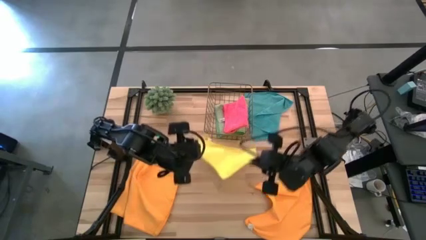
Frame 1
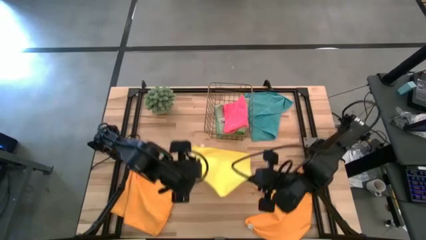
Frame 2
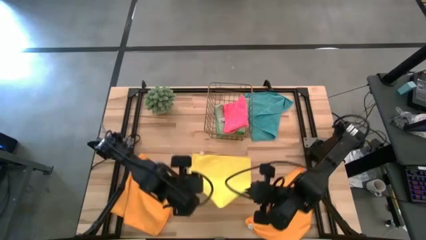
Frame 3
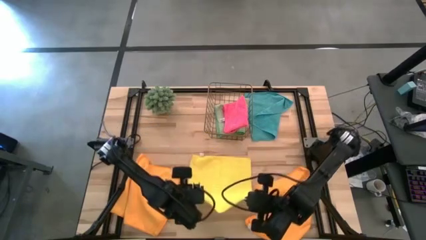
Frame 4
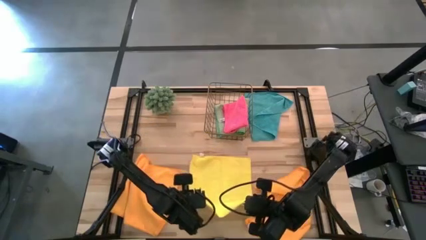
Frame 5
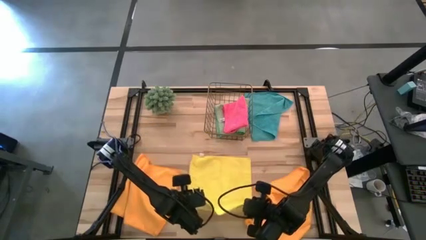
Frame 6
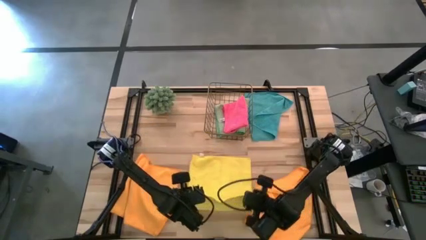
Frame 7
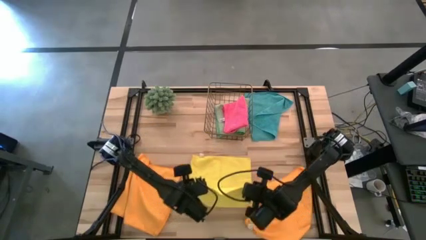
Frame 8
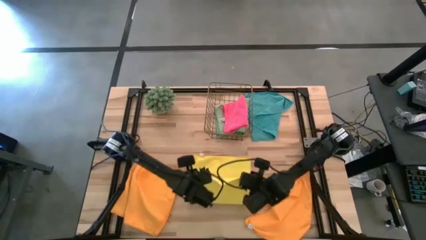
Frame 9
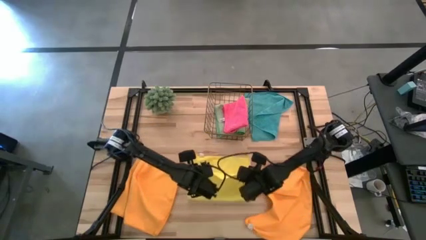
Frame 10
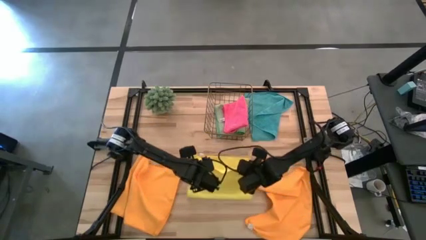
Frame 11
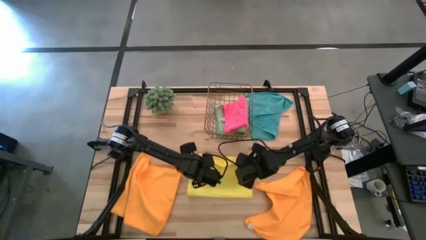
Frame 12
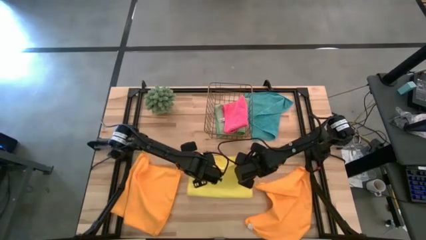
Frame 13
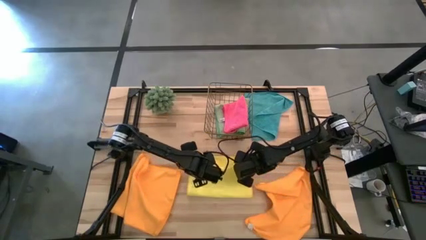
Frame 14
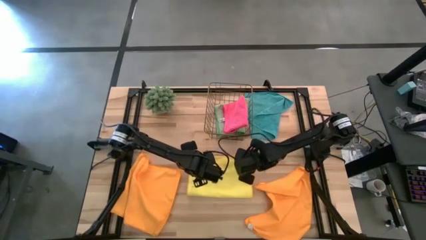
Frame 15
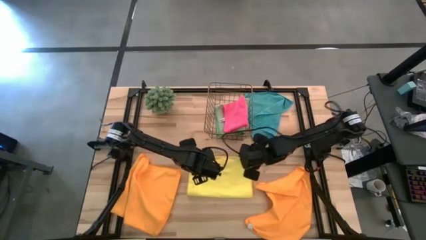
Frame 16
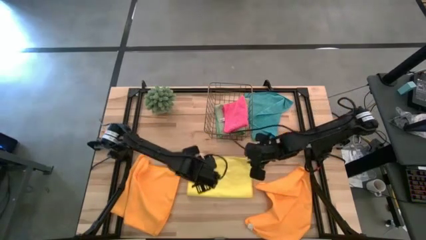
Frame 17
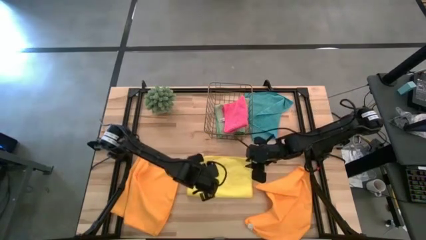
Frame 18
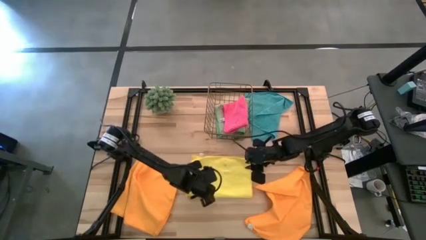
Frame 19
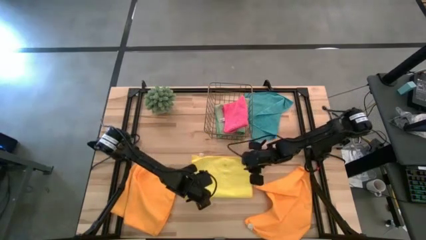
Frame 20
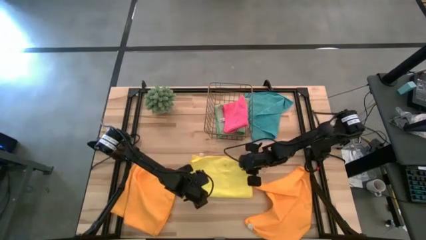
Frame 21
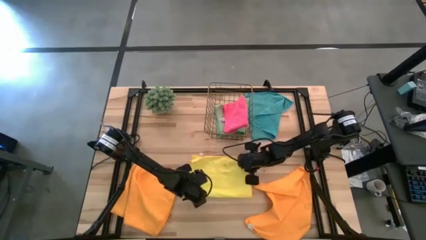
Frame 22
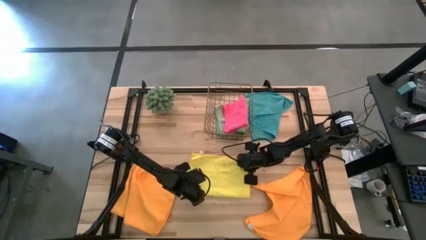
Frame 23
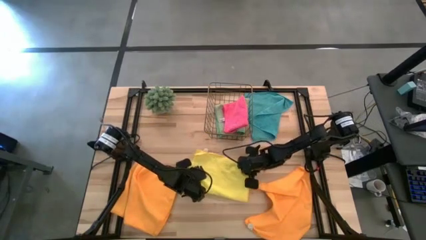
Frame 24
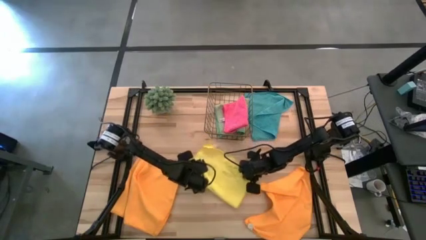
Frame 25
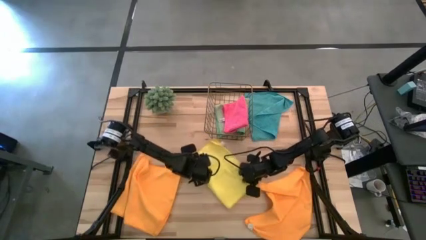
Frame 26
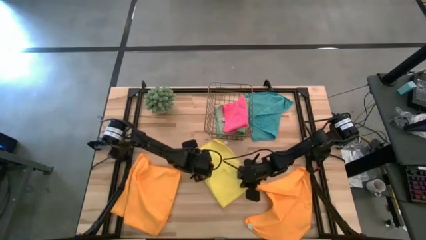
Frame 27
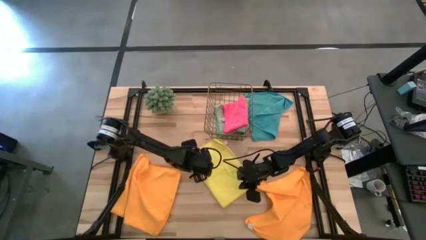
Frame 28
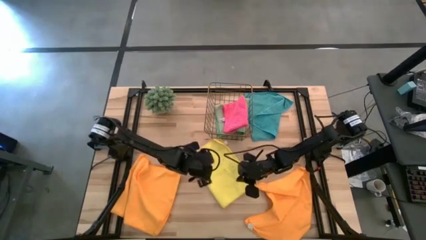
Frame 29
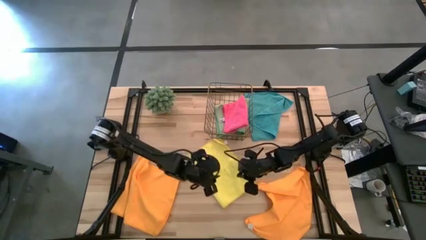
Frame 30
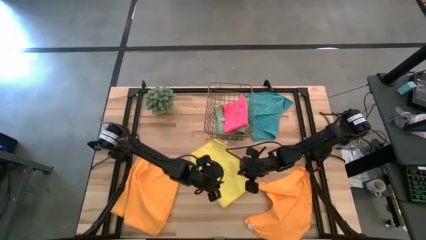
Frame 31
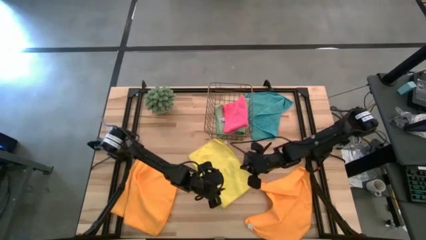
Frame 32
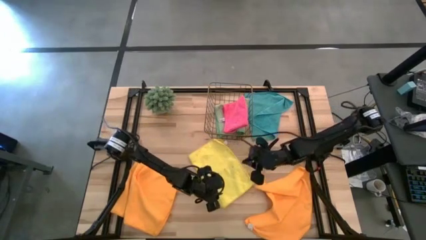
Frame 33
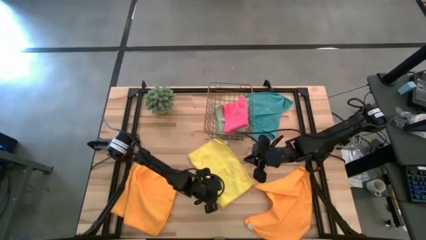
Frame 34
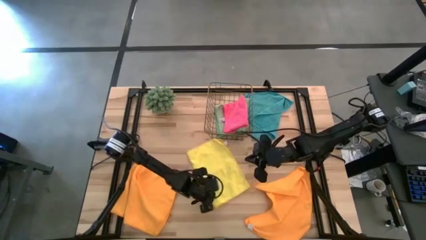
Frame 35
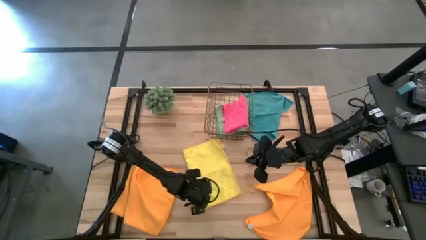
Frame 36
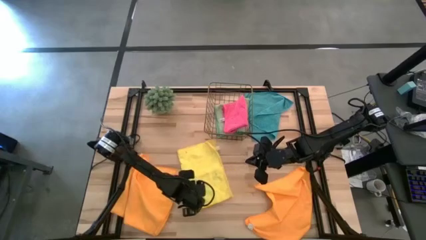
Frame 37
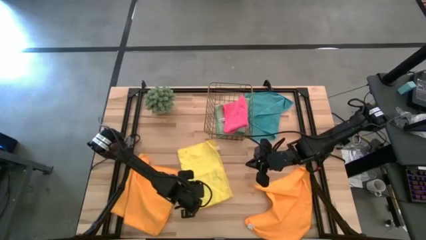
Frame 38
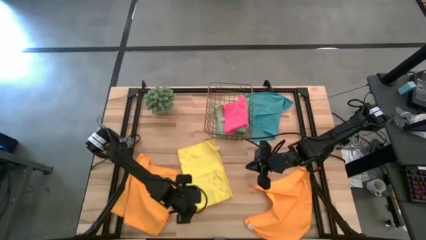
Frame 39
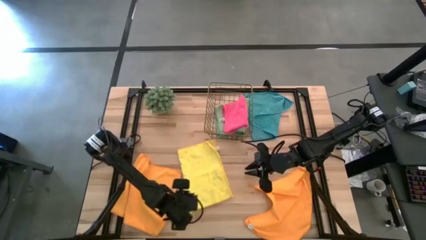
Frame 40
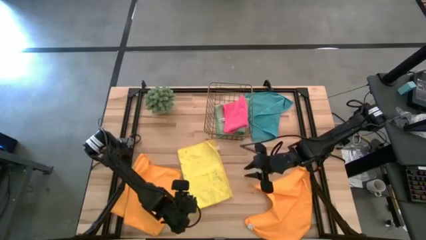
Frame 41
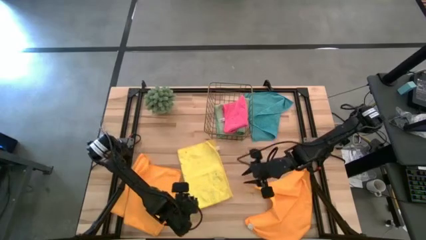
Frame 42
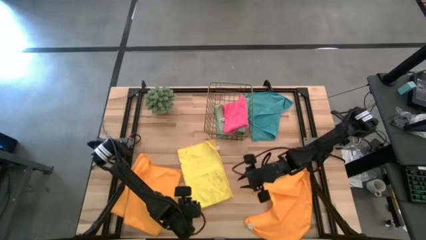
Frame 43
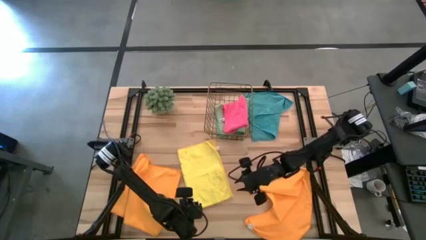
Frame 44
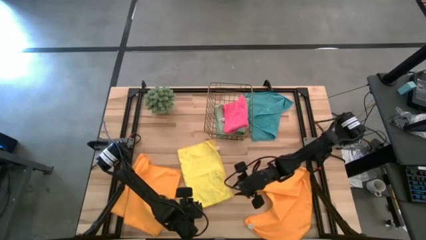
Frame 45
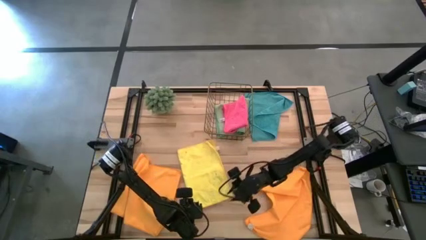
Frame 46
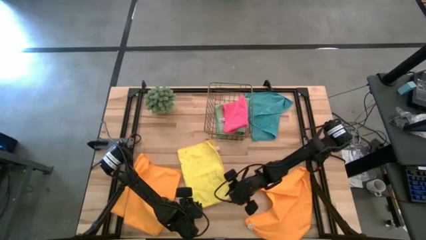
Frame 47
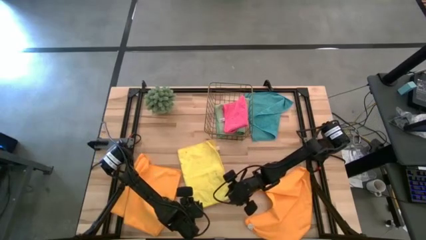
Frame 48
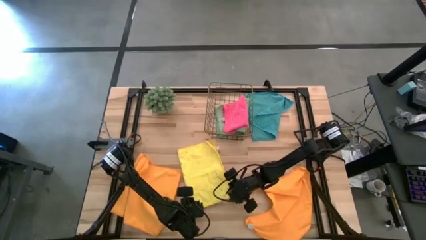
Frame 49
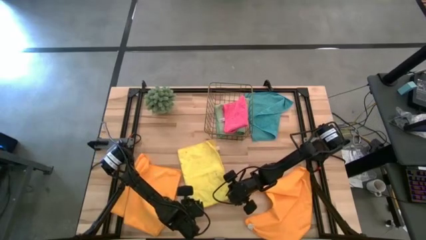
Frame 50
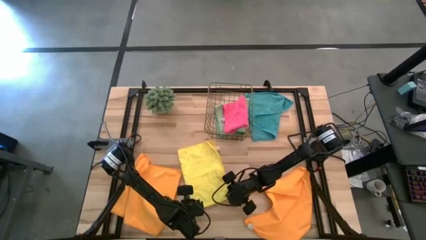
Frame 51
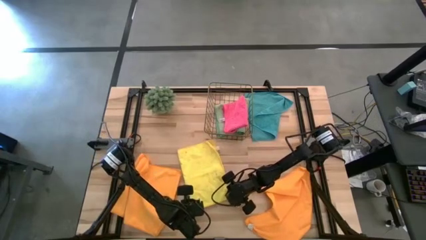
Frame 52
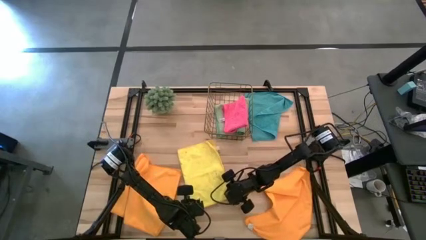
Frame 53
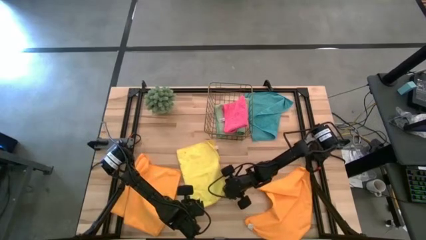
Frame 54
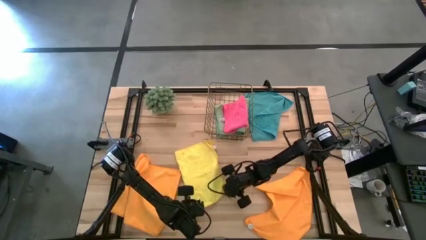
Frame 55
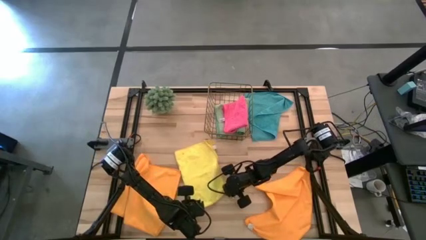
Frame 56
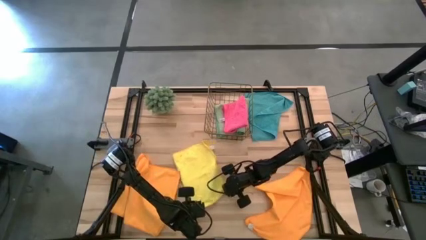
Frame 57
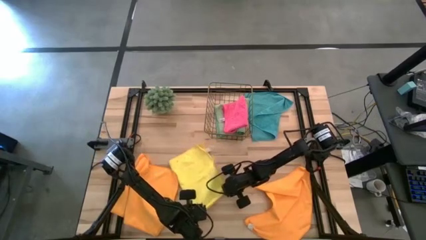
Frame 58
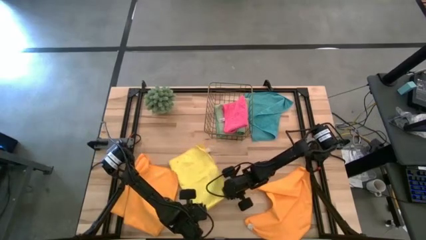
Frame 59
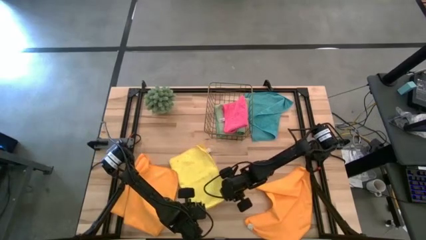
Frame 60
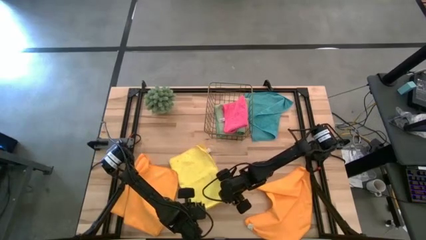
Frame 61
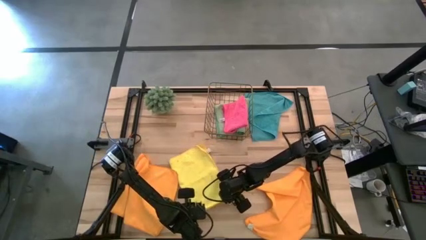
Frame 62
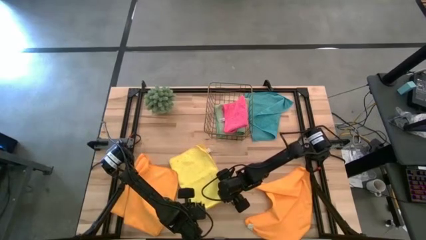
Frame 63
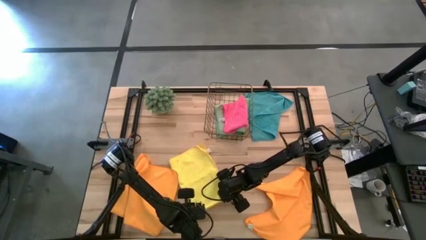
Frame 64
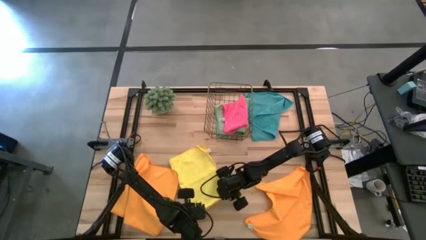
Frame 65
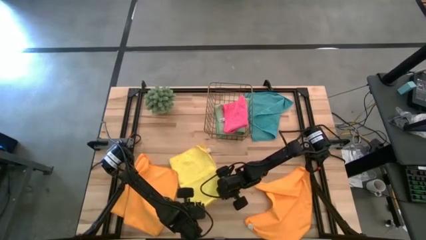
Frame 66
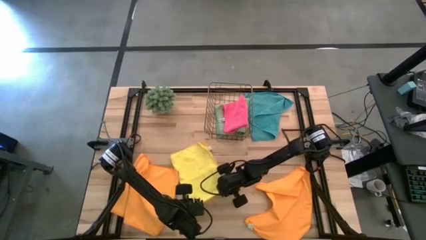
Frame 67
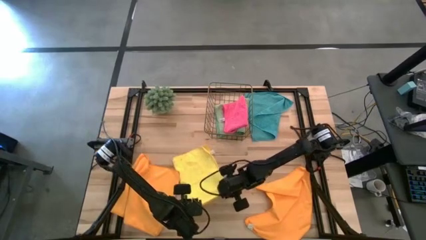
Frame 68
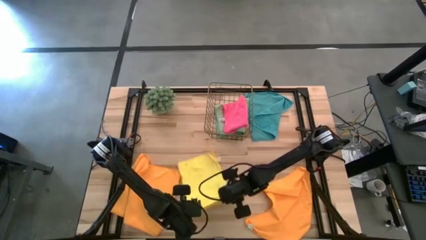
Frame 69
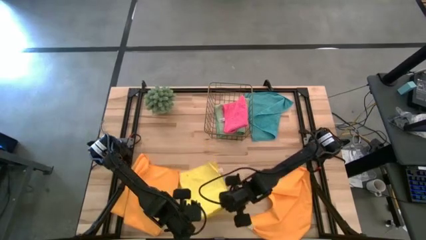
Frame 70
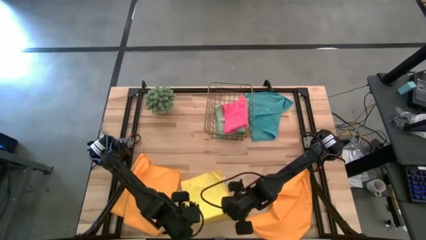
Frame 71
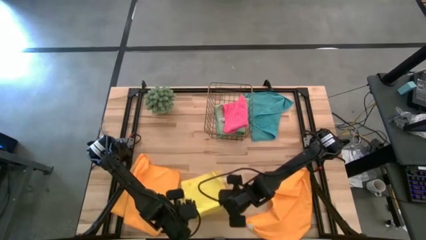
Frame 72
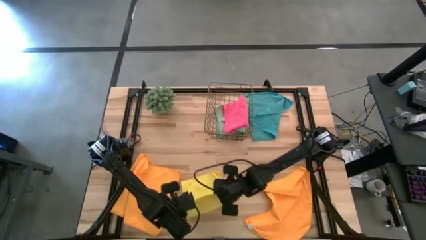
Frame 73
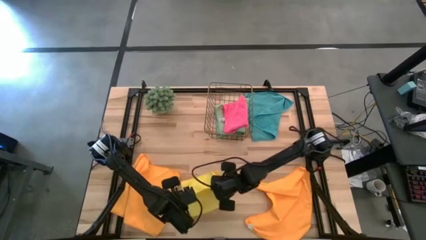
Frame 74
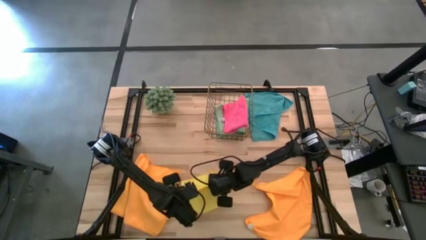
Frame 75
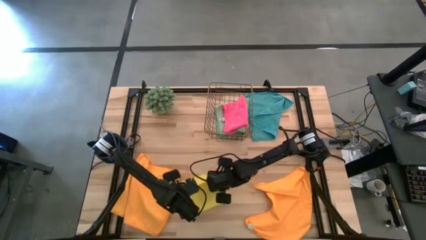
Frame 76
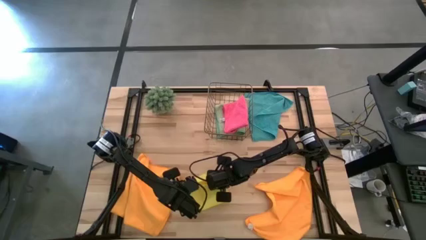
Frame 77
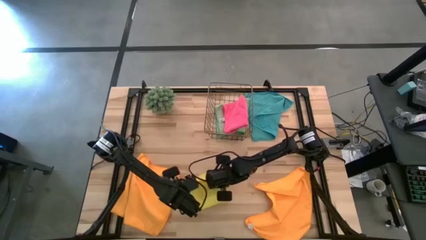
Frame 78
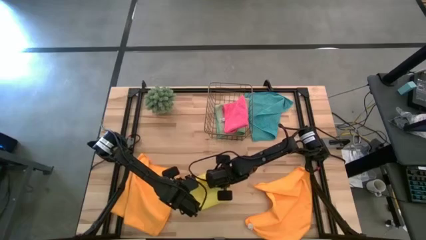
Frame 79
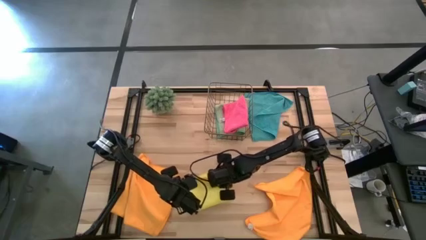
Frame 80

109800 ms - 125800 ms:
Task: Fold microfiber towels
Fold the yellow towel
